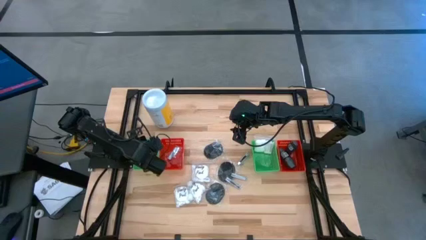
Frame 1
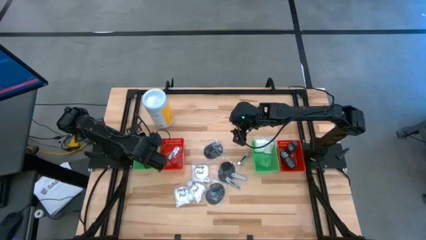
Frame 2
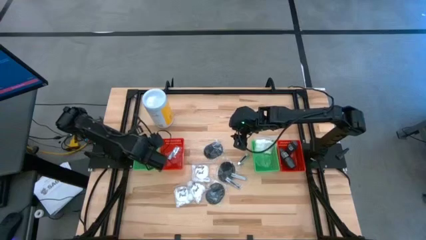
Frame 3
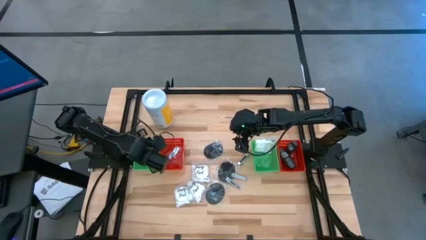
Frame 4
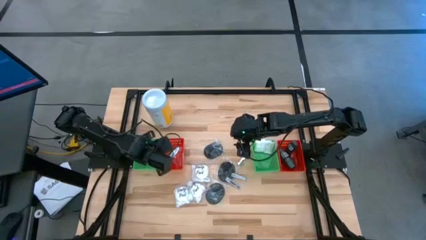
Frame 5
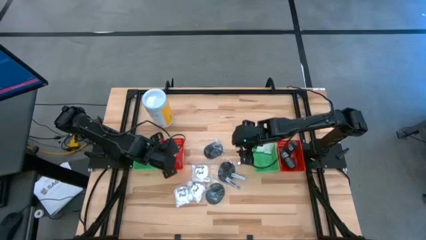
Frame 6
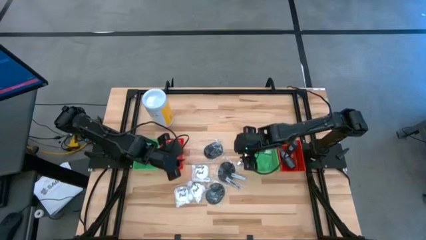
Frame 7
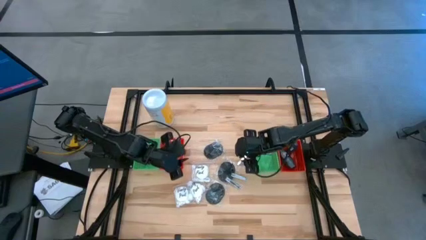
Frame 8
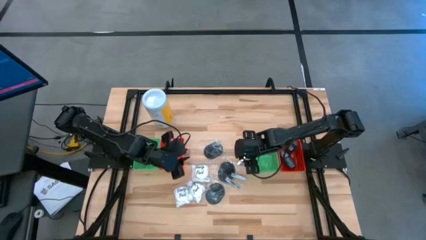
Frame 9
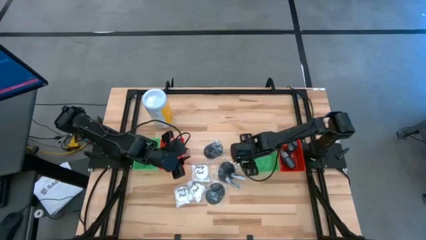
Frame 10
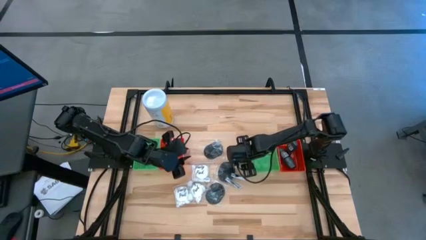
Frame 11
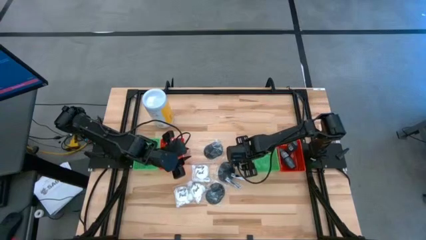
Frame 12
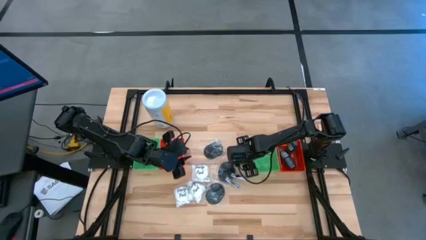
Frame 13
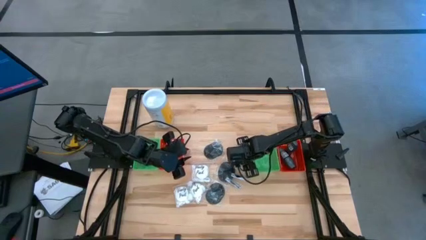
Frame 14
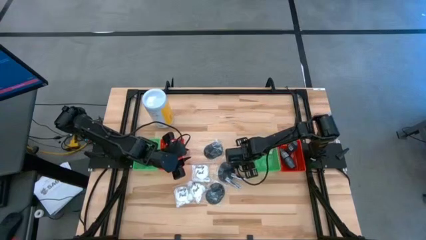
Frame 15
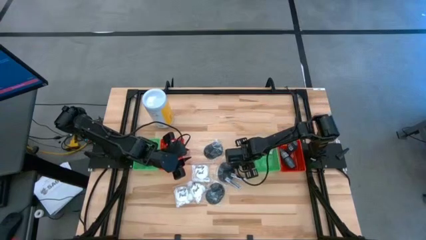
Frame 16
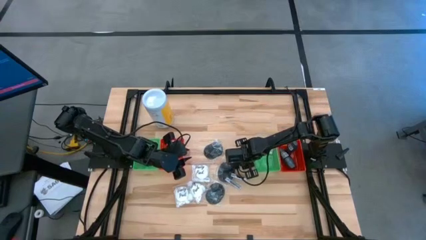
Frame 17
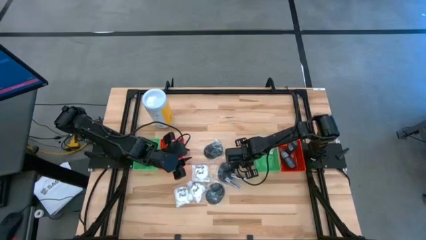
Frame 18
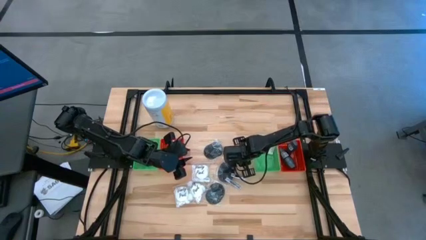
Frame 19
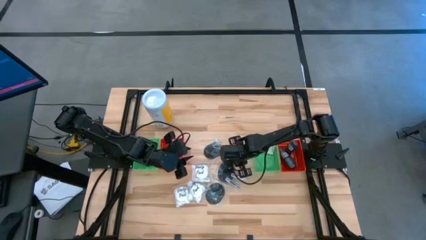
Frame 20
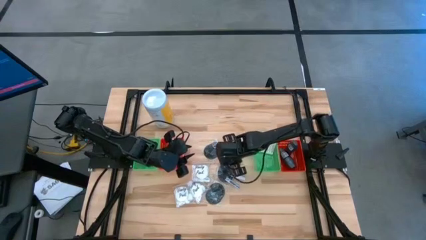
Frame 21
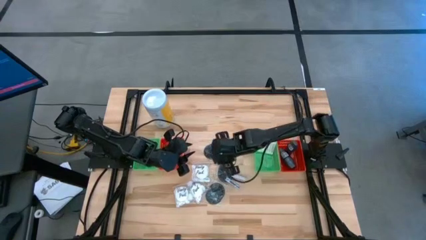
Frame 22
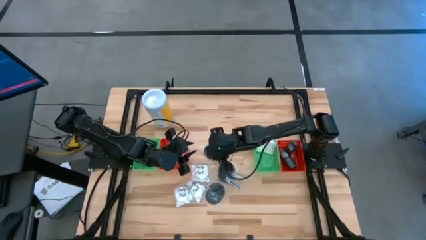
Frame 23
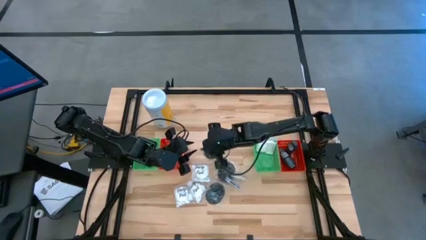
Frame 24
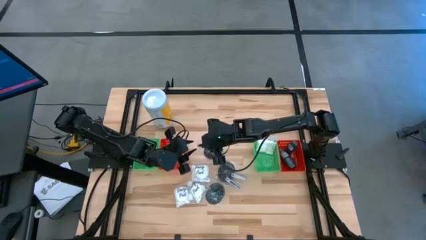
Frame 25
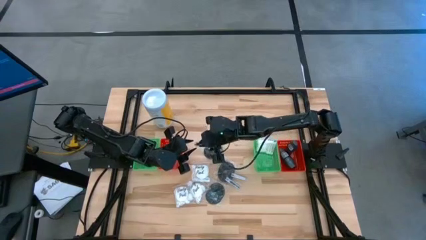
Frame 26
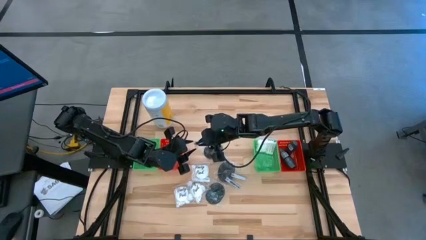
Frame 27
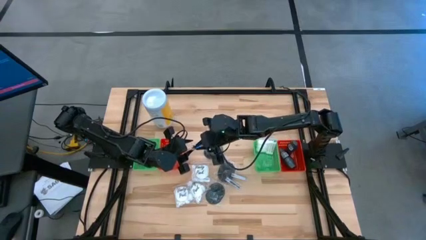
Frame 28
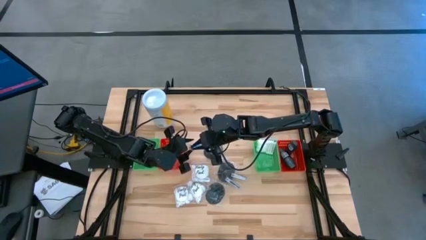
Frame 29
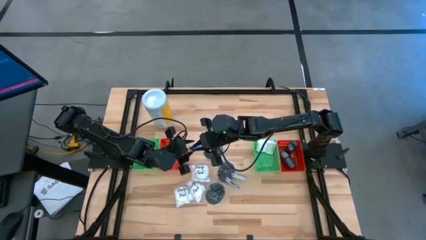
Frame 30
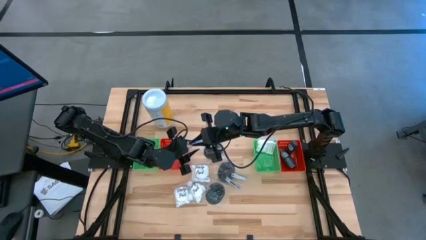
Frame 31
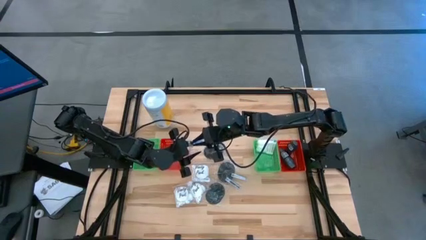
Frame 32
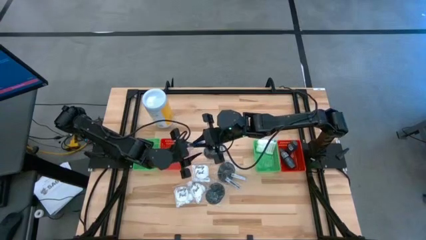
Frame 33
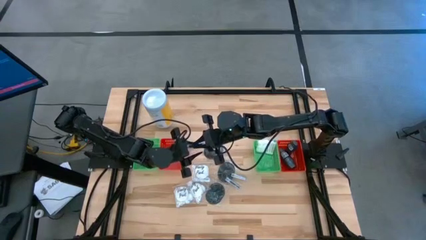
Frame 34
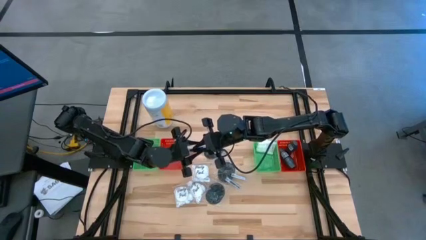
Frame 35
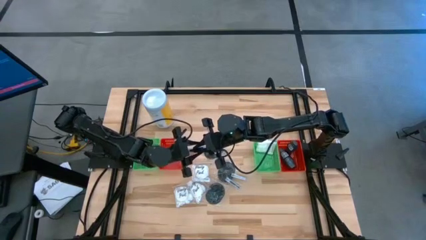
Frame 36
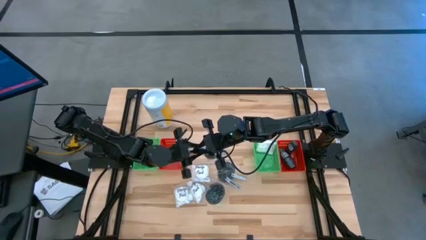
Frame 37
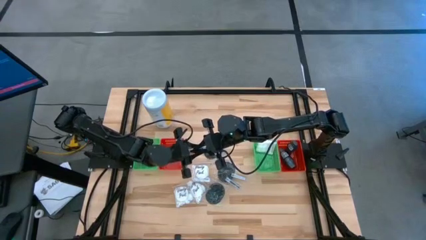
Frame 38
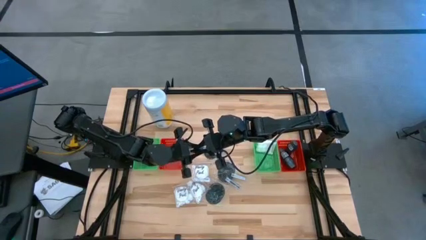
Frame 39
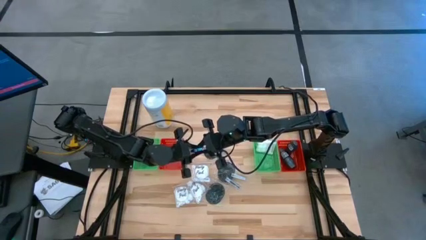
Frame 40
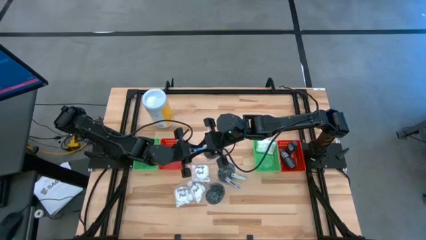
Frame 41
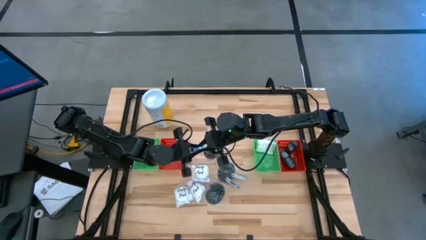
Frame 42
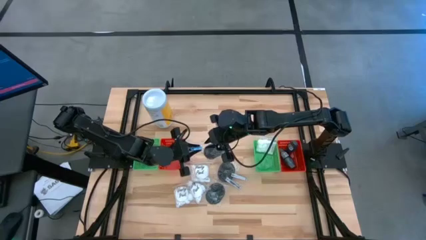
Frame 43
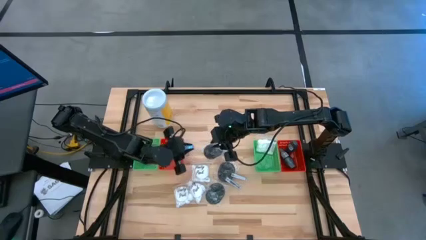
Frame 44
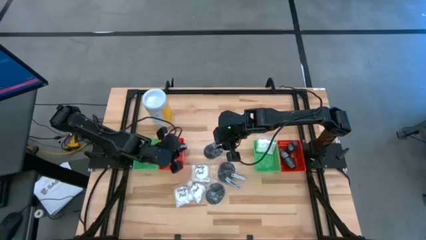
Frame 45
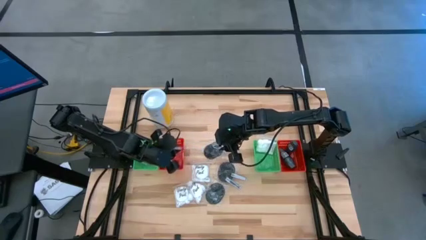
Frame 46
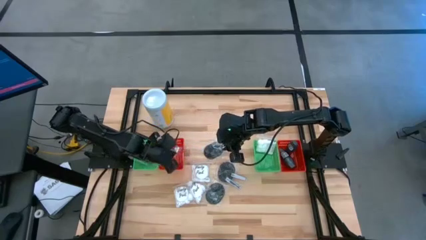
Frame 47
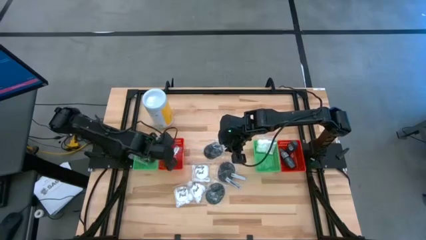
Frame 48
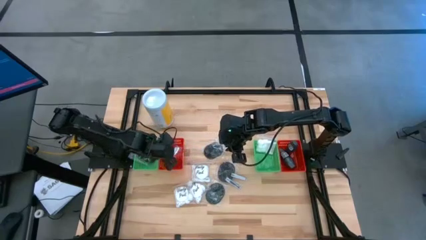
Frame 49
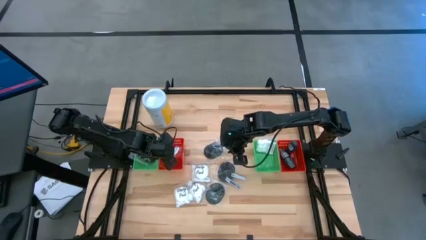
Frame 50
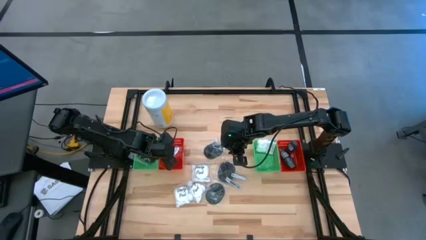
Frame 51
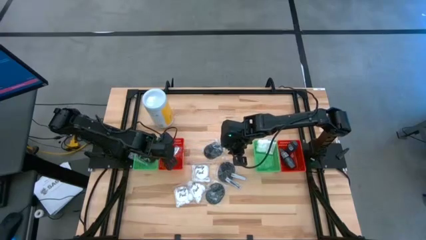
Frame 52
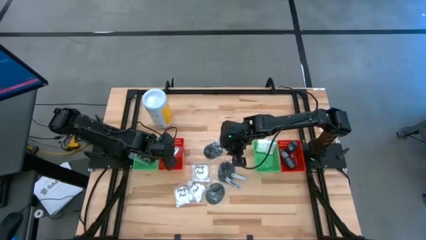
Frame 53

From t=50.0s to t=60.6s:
Task: Pick & Place Travel size toiletries
Put the silver nail cutter into the left red bin

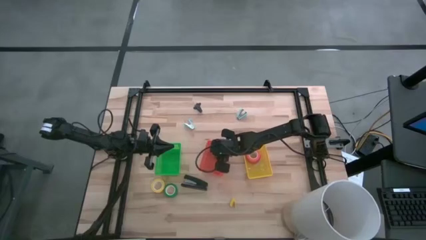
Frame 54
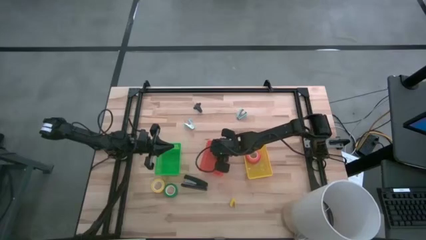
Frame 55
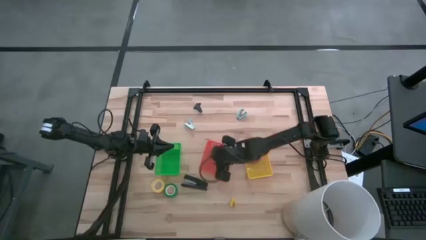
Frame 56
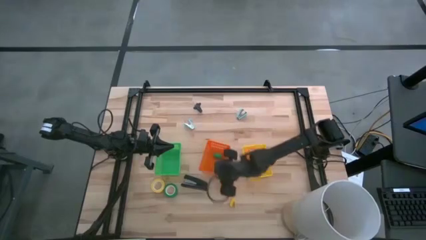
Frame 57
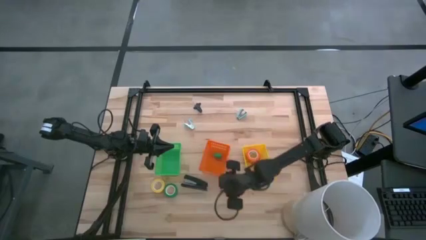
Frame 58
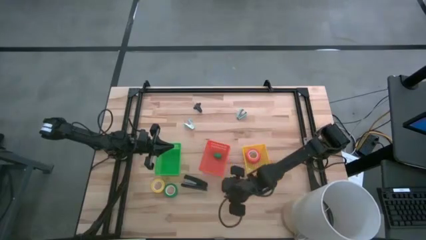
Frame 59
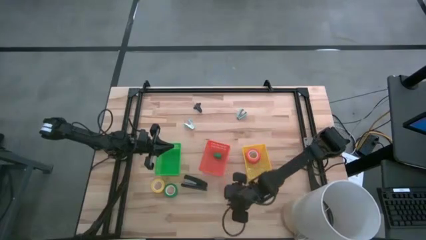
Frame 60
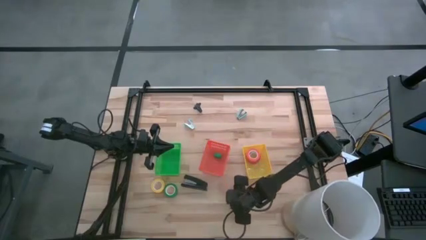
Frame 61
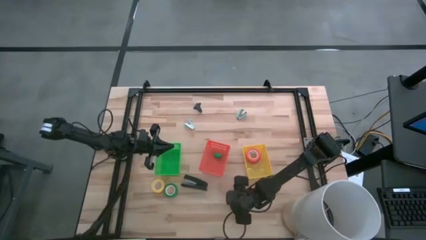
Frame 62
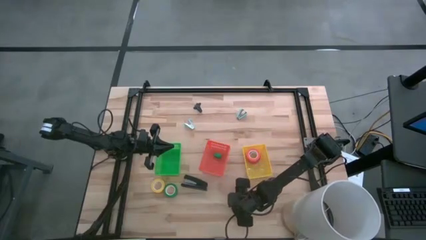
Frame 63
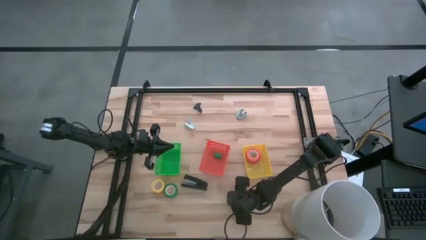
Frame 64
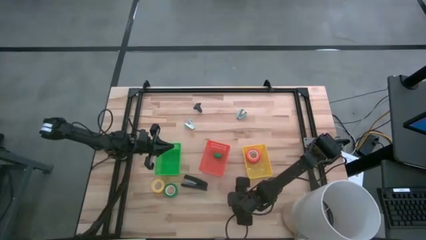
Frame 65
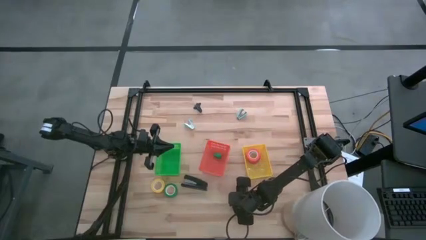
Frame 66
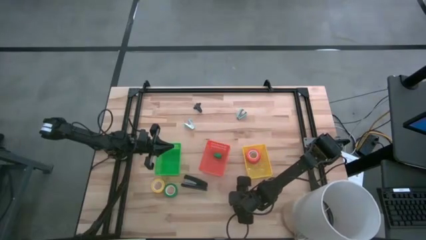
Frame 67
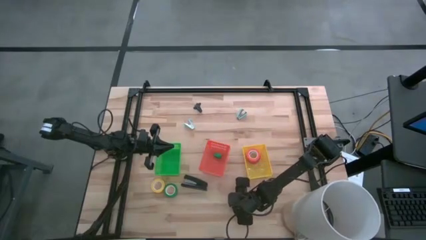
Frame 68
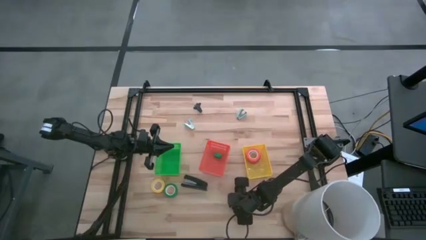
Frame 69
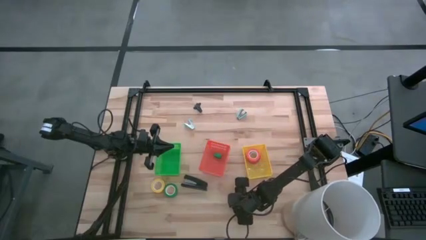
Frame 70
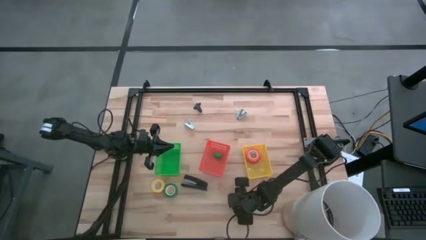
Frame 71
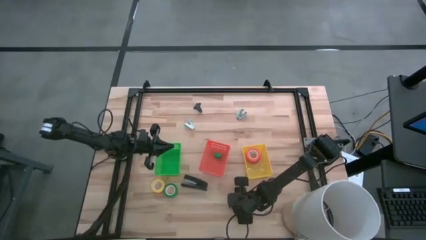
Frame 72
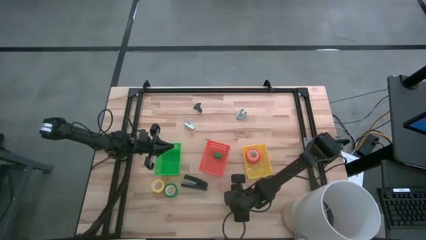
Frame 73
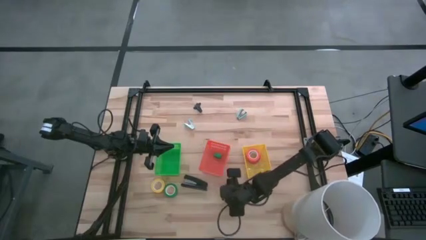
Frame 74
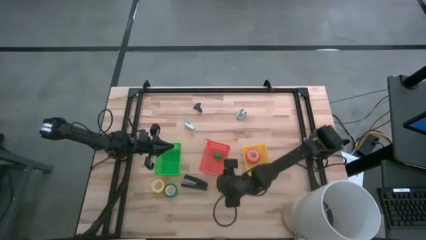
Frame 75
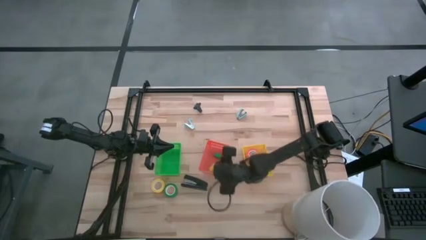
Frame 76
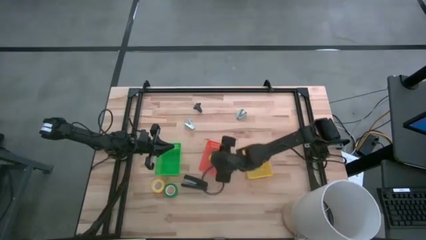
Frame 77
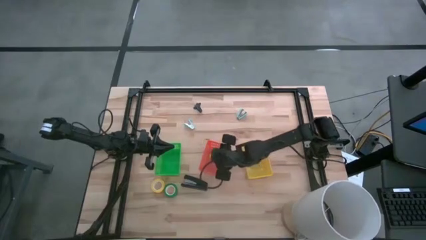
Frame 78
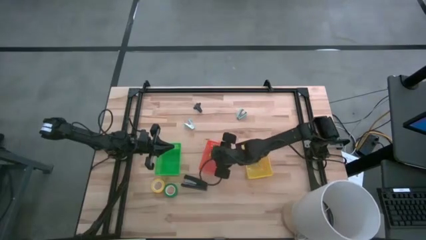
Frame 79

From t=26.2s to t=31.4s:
Task: Pick and place Stapler, Stapler remover, tape
Put the yellow stapler into the orange bin

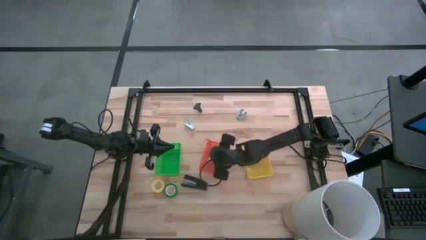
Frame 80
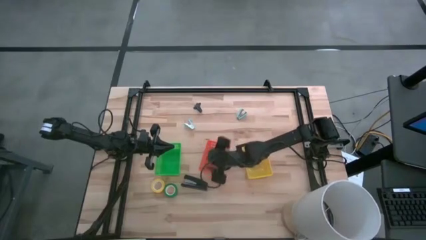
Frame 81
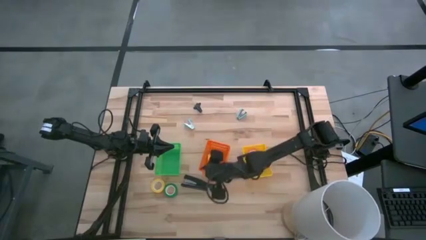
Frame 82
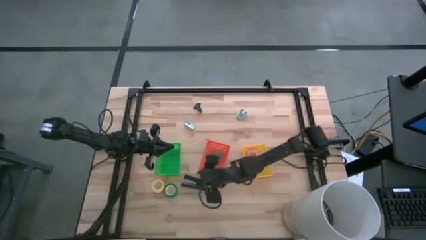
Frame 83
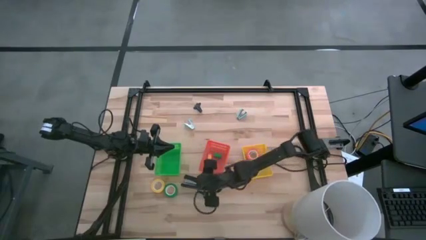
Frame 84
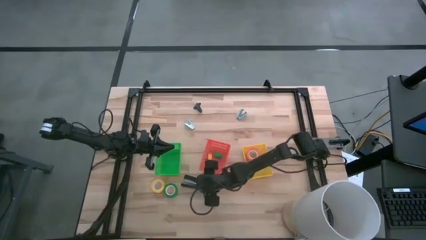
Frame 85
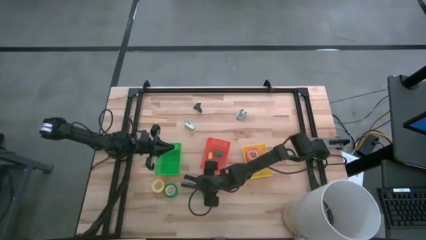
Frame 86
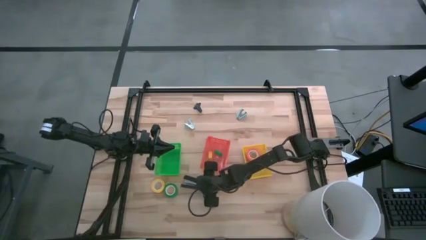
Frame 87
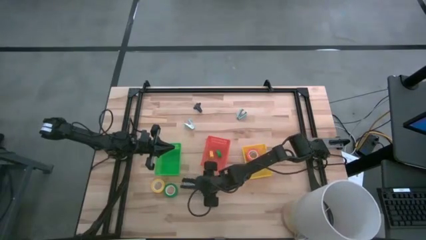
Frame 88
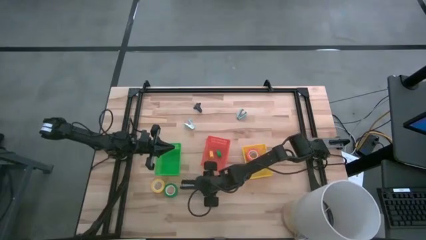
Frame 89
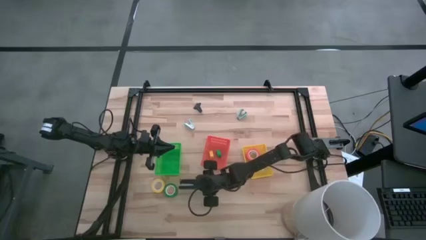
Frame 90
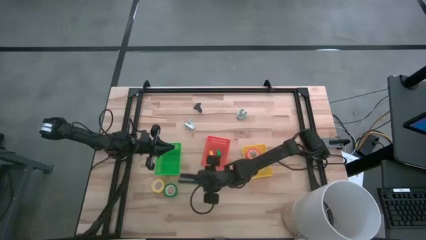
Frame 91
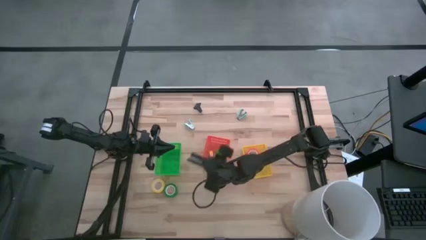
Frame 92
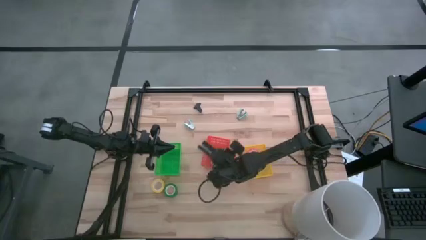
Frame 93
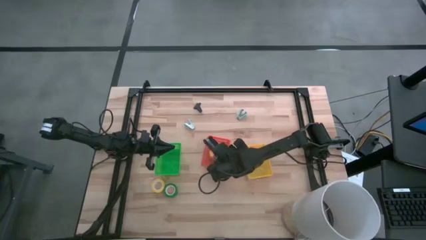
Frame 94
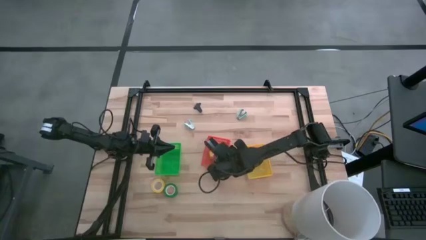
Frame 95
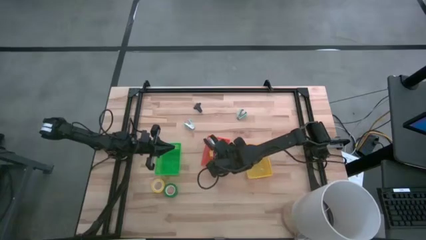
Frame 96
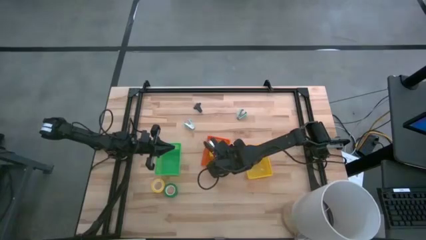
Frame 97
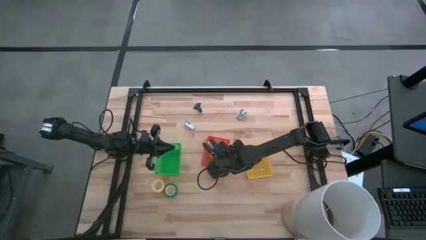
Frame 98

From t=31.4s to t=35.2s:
Put the black stapler into the orange bin
